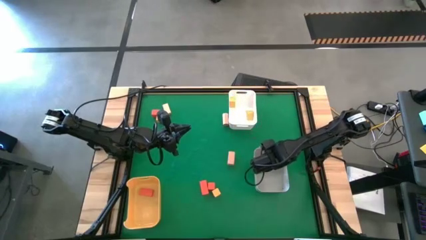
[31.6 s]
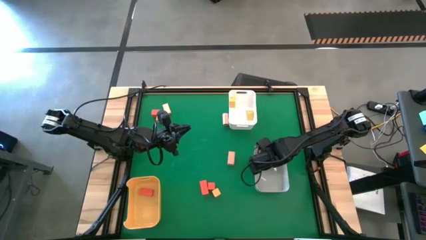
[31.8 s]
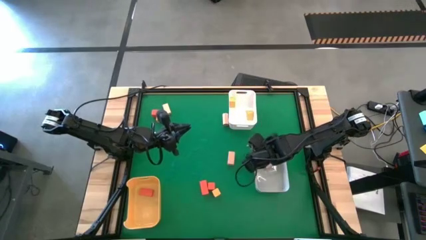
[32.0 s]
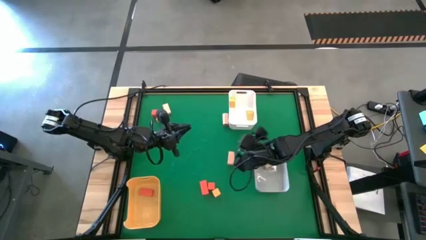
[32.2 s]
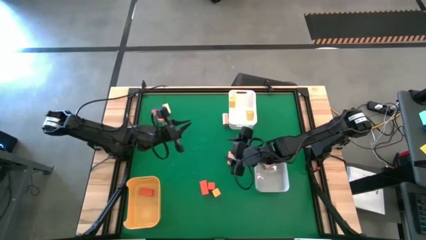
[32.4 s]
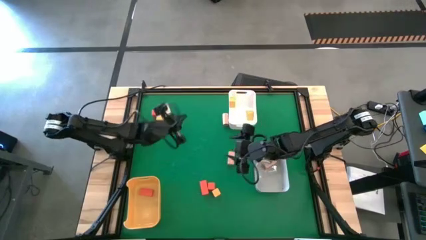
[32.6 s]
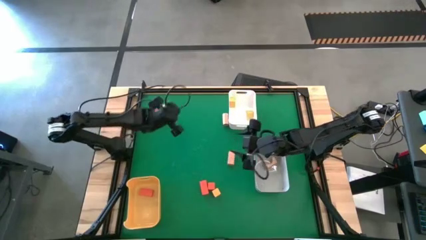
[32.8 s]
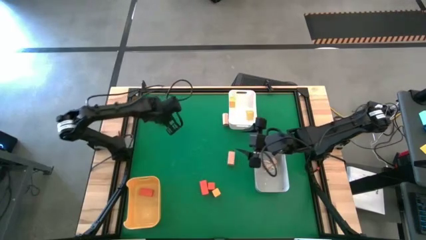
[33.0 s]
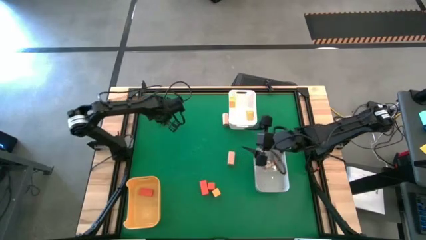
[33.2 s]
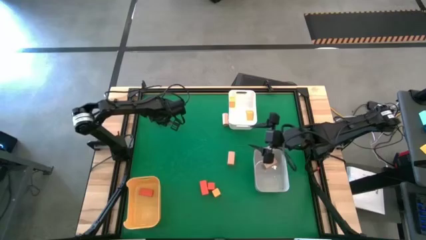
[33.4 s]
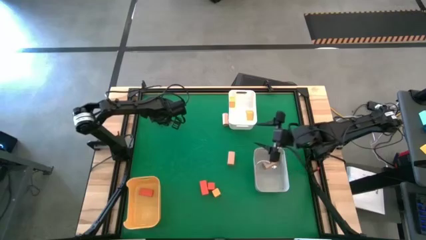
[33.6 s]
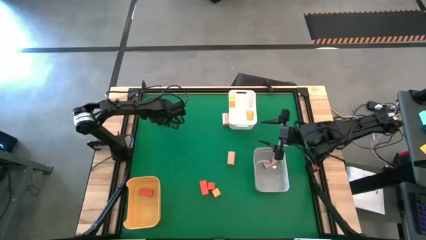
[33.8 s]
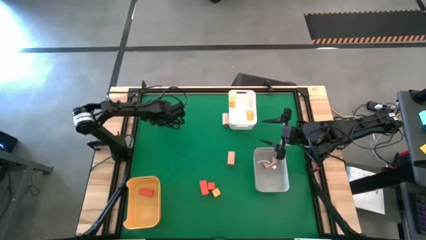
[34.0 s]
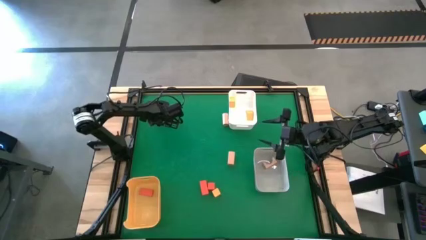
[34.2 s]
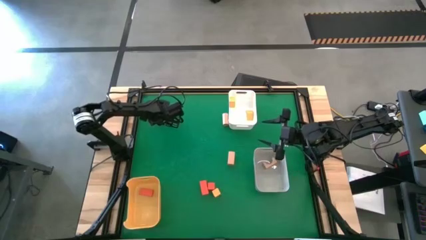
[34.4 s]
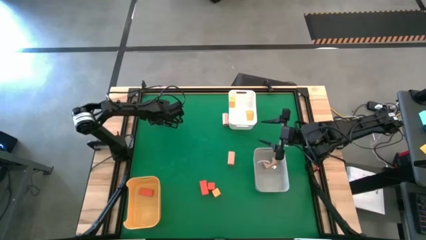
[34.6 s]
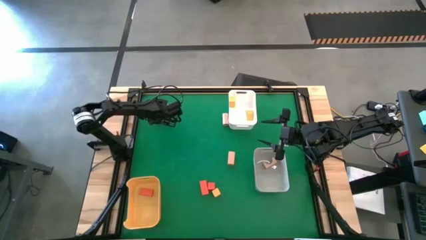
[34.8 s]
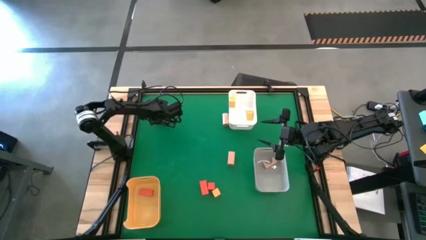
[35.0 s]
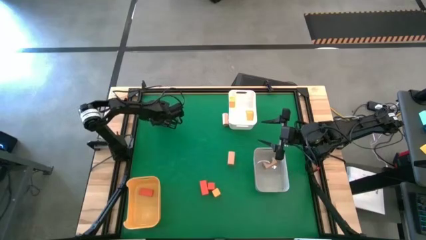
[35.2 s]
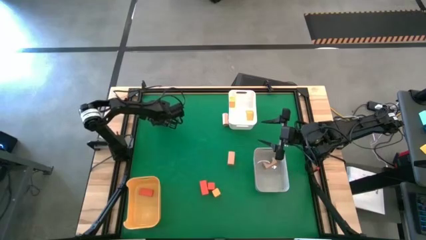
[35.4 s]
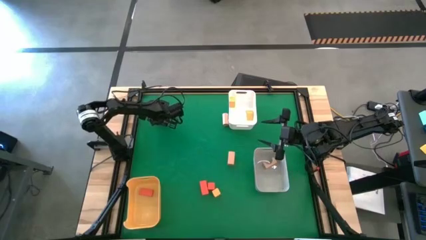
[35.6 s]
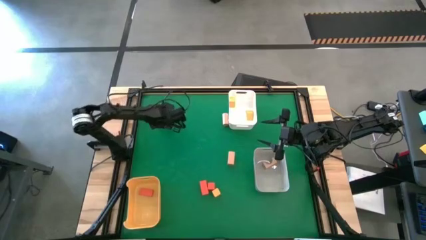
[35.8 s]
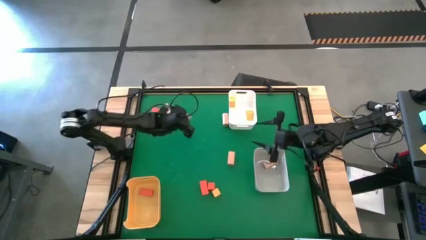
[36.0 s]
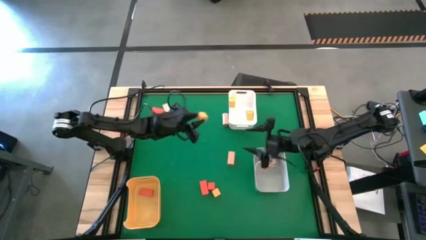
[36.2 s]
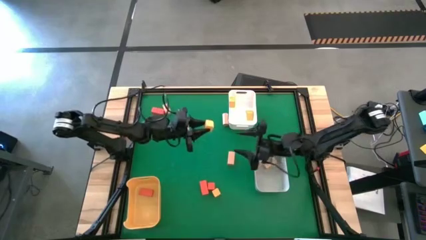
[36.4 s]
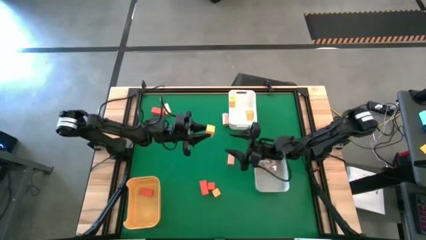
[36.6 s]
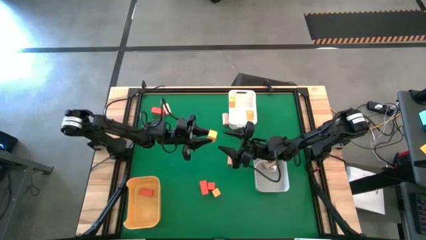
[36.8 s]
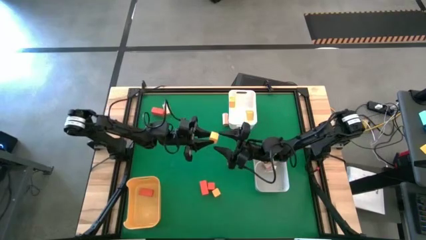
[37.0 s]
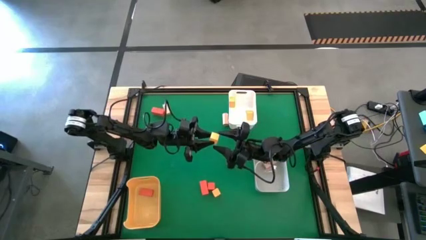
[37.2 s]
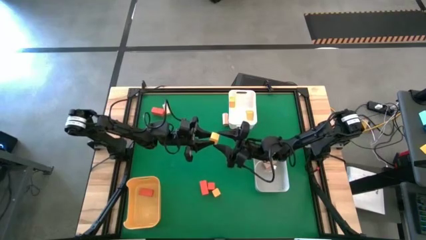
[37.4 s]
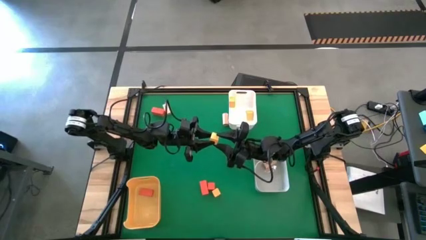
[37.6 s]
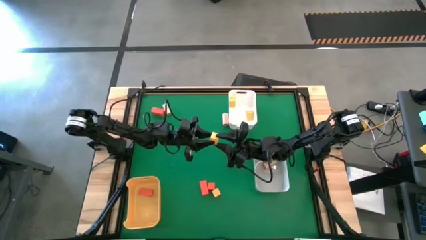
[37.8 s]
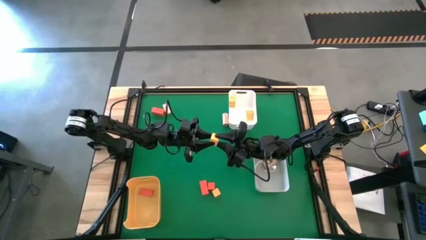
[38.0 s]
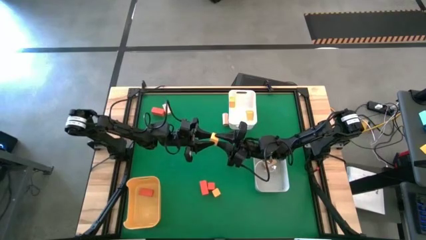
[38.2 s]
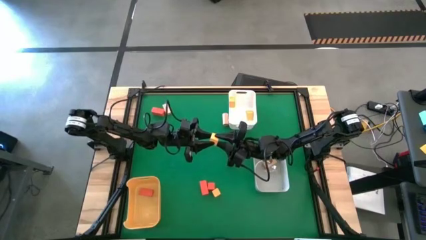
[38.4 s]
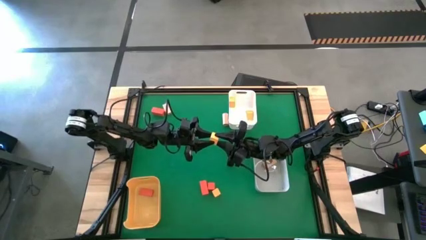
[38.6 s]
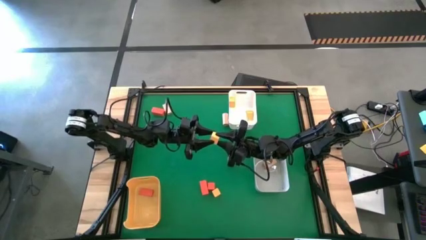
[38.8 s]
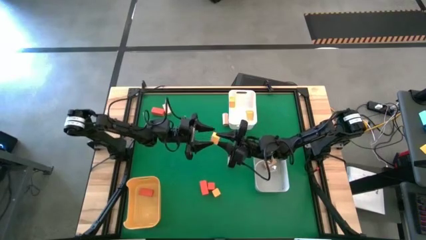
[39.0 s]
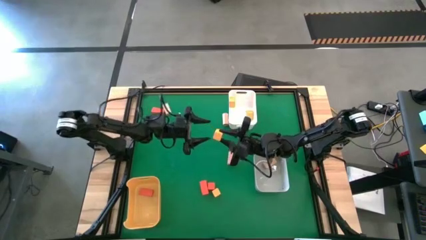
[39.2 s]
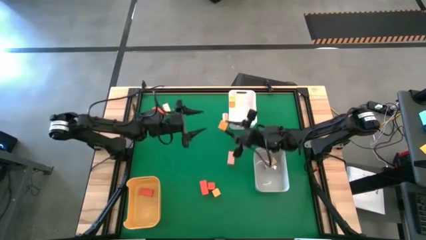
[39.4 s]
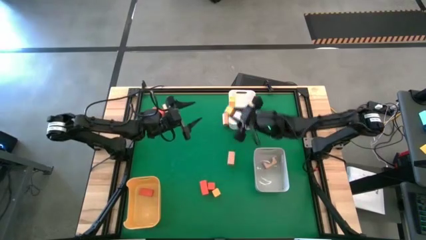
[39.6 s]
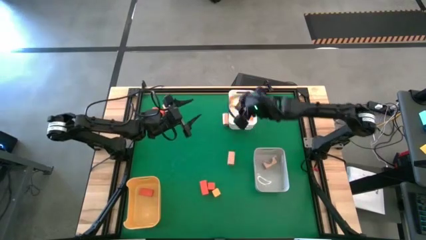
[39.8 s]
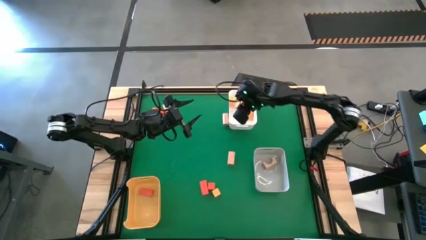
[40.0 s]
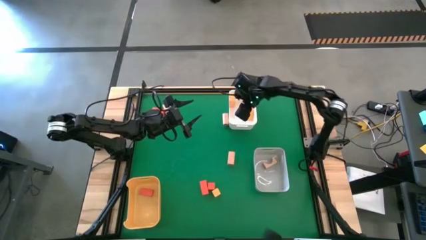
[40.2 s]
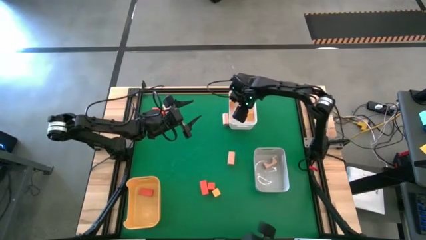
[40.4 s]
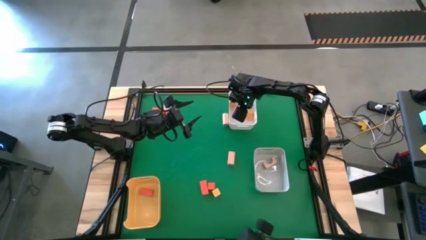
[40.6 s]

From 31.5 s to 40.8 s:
Task: Sort & place blocks by color
Put the yellow block into the white bin

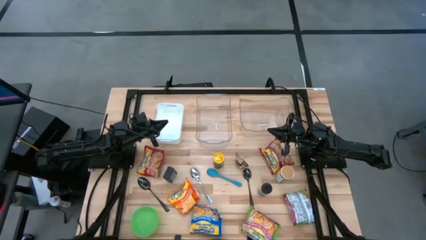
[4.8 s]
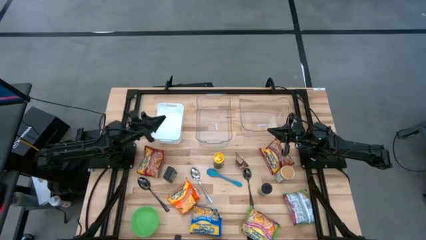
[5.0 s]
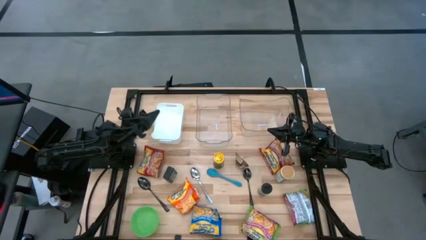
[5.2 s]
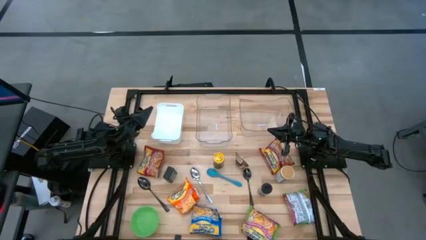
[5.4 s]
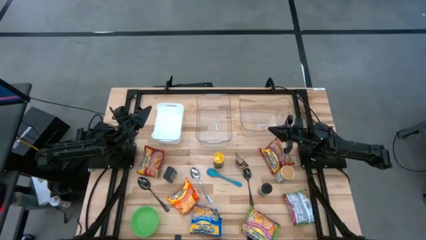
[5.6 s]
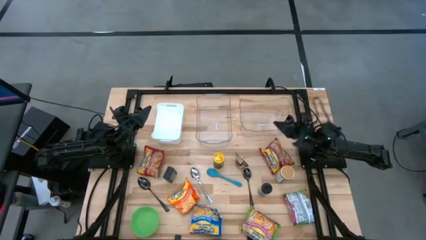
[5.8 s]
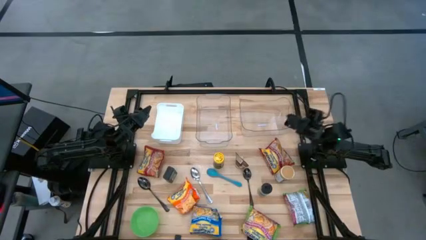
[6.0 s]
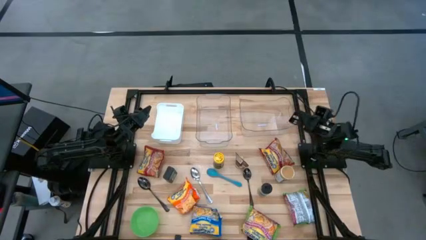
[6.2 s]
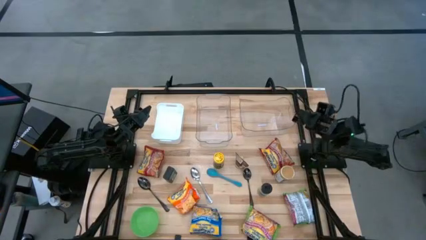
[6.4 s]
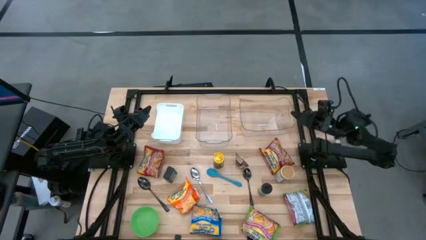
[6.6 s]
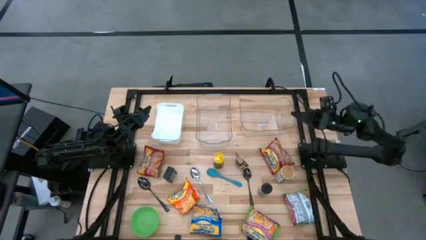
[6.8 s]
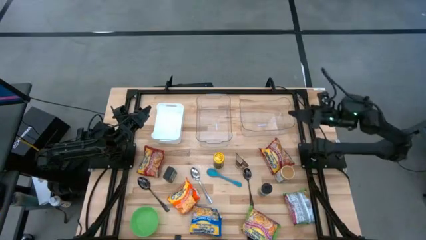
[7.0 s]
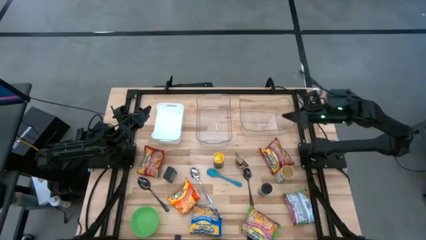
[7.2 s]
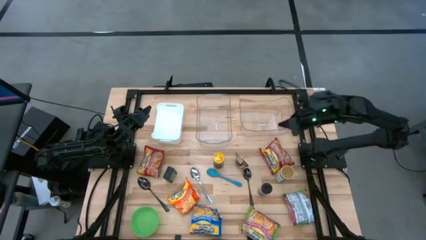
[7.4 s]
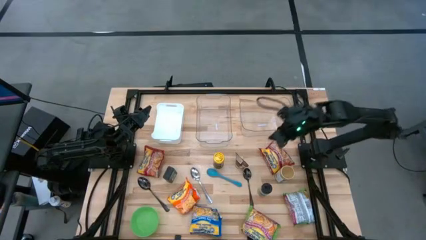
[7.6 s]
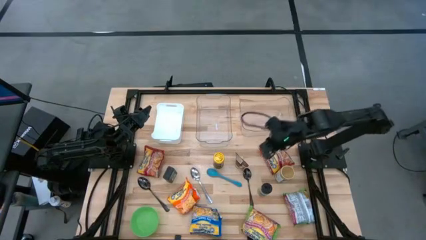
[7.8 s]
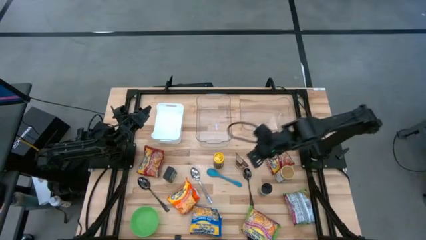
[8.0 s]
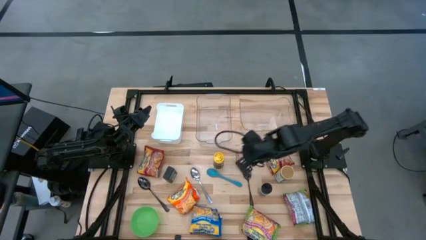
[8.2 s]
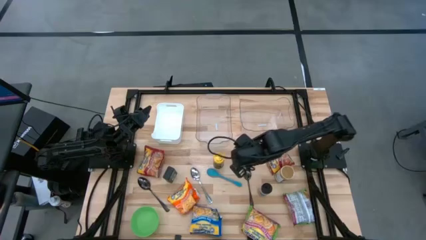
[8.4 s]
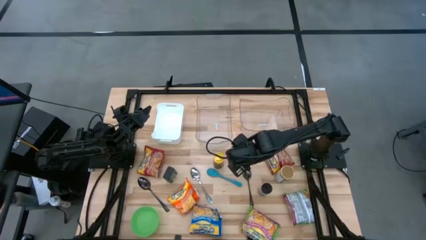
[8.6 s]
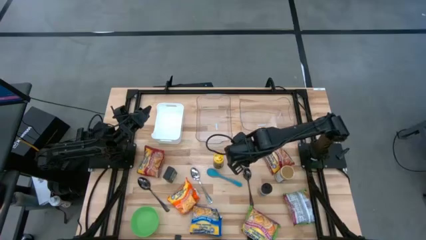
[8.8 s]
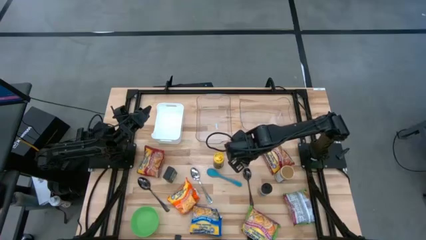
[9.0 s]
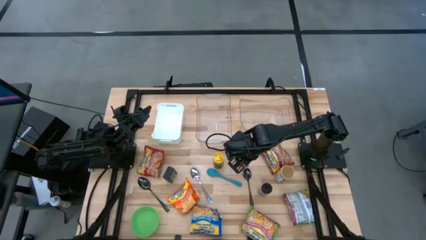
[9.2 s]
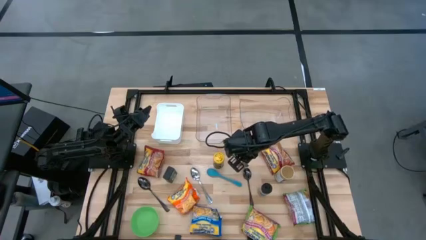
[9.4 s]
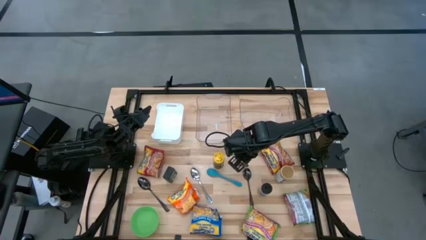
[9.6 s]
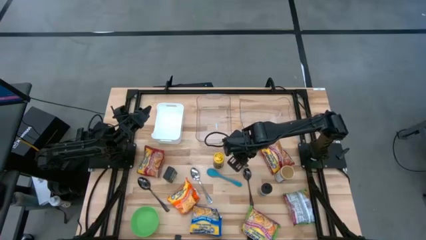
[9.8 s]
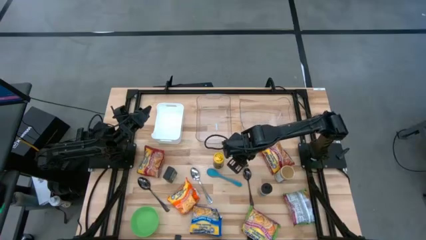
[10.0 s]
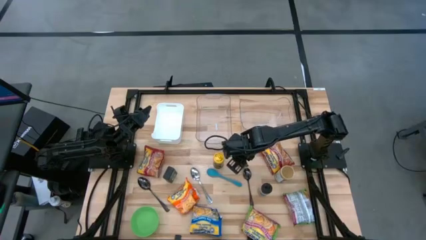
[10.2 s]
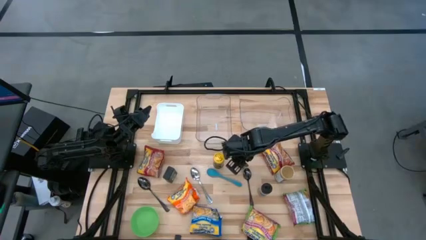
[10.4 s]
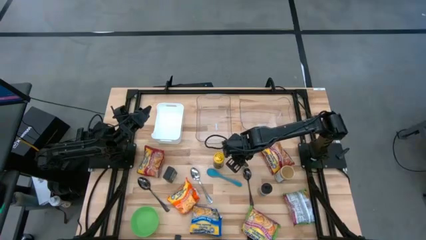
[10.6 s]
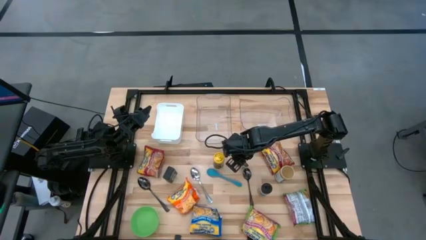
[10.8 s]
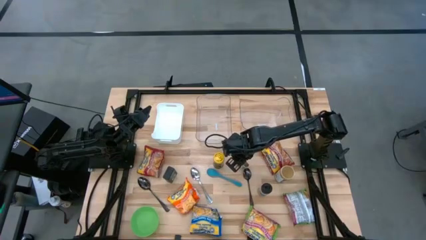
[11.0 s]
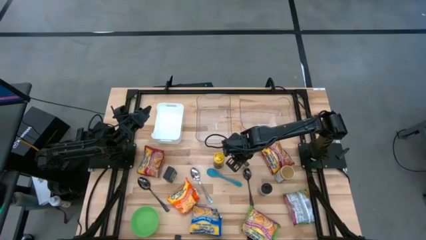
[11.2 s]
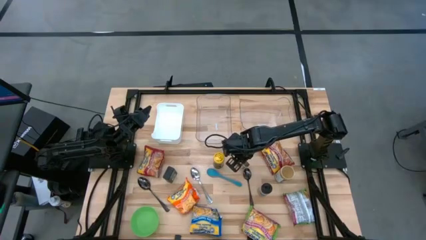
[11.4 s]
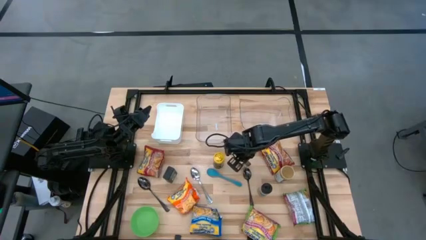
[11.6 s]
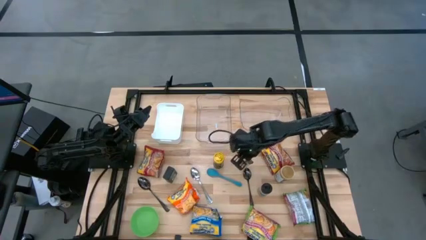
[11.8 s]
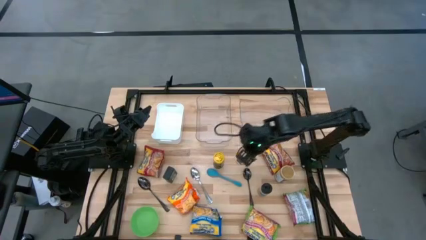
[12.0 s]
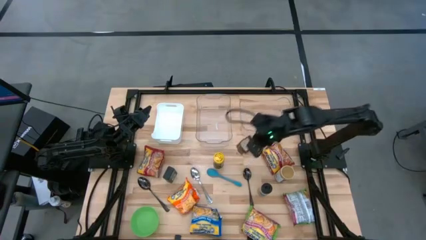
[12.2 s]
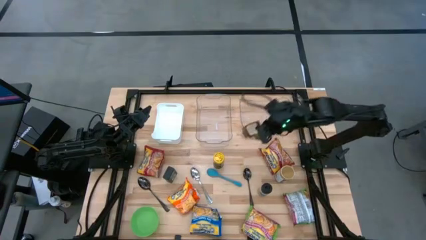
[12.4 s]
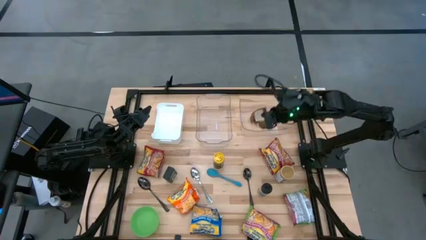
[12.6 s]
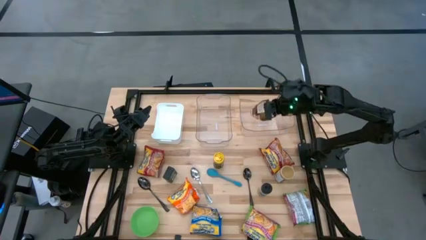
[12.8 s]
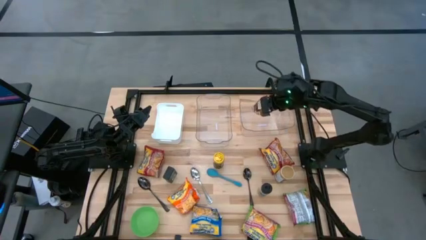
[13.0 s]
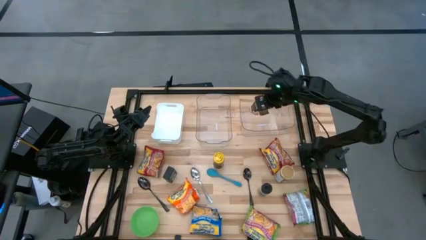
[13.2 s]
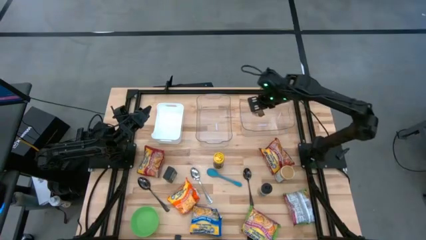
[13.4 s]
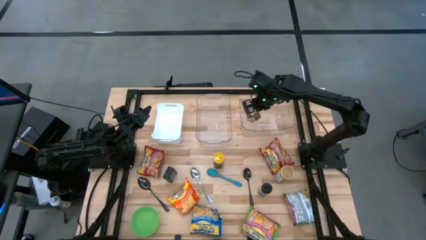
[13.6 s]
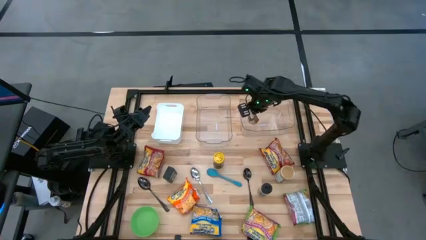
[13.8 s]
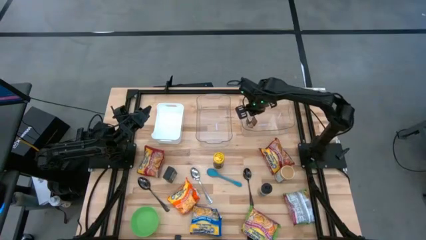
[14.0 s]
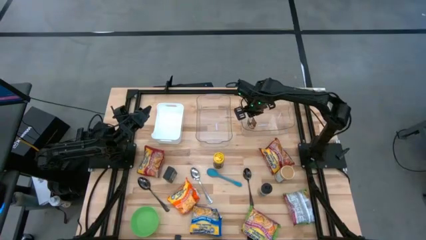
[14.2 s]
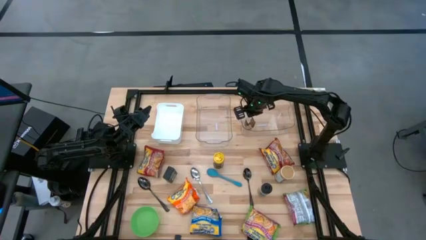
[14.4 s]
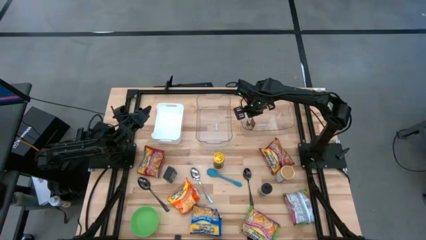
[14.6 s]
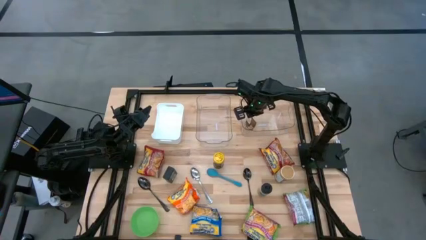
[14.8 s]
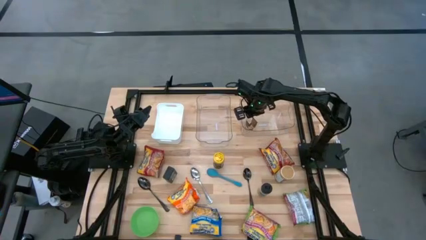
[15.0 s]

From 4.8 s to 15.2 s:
Task: Pick & Place Food Item
Put the orange spice pack into the right transparent bin
